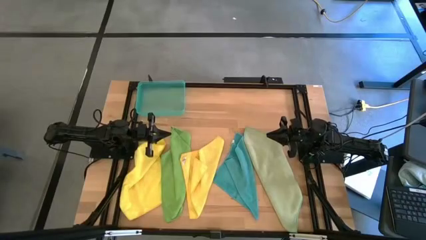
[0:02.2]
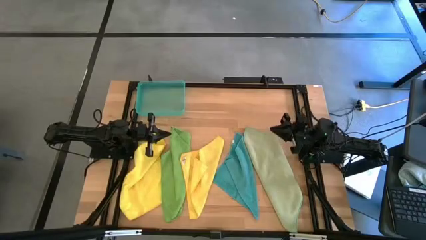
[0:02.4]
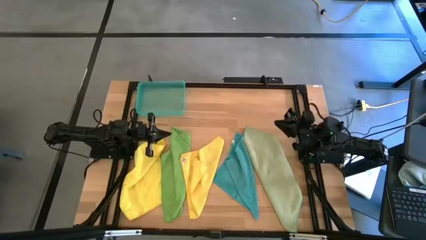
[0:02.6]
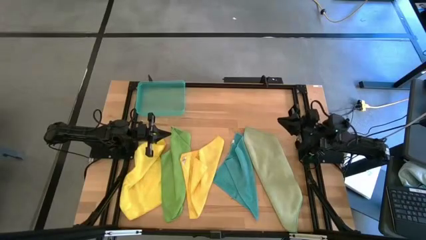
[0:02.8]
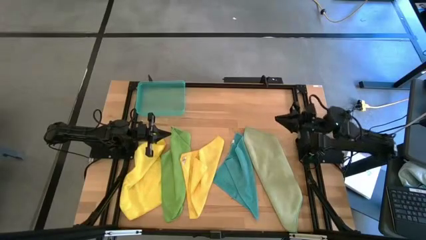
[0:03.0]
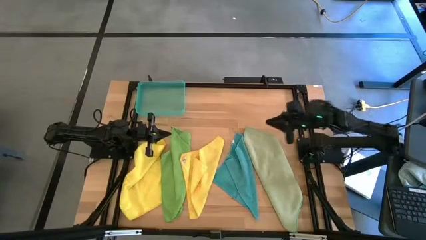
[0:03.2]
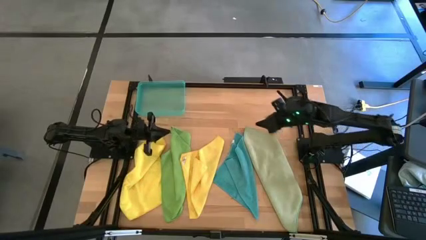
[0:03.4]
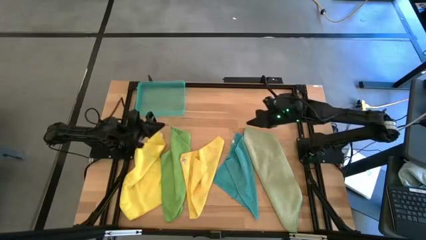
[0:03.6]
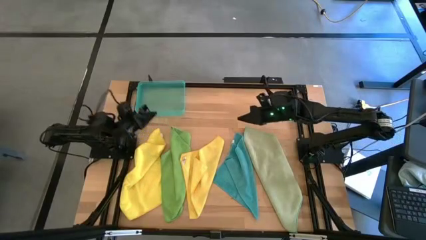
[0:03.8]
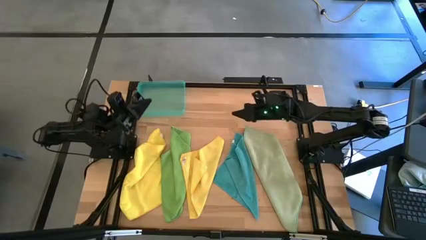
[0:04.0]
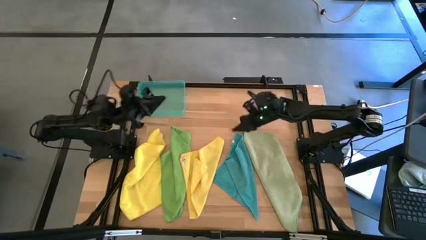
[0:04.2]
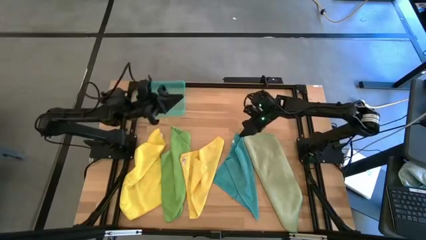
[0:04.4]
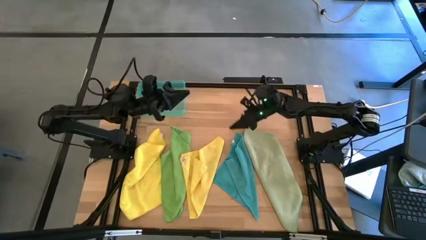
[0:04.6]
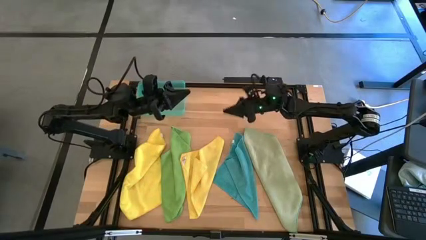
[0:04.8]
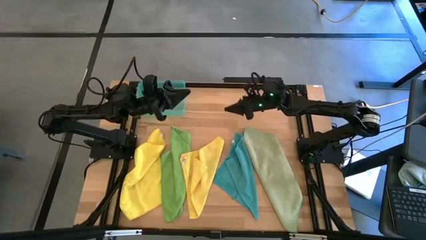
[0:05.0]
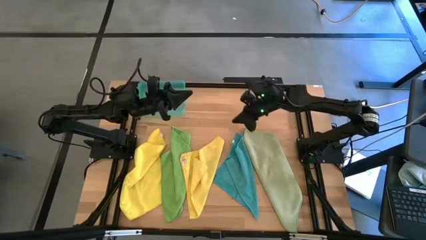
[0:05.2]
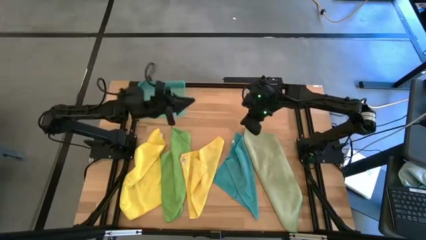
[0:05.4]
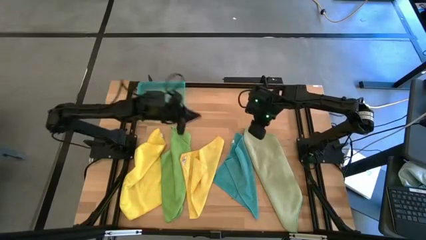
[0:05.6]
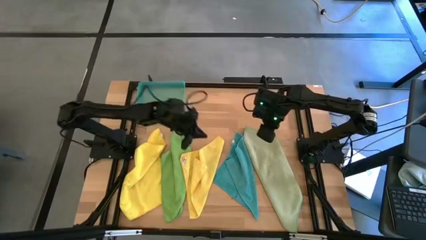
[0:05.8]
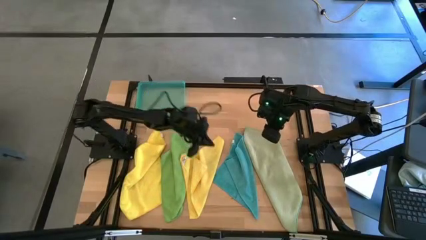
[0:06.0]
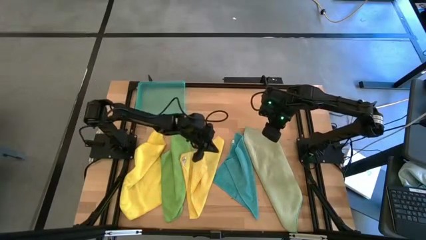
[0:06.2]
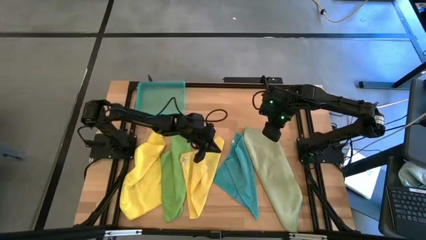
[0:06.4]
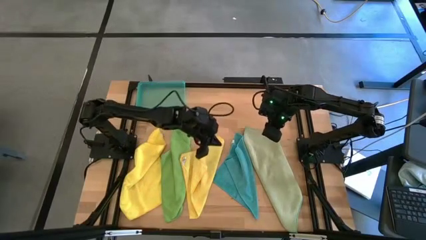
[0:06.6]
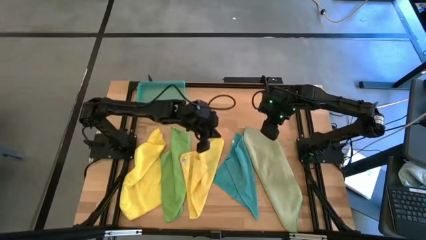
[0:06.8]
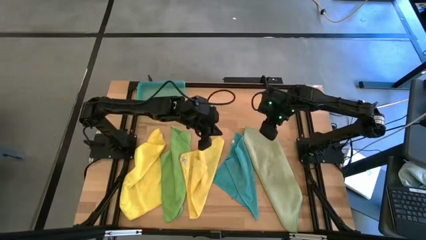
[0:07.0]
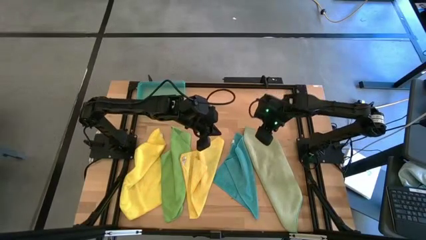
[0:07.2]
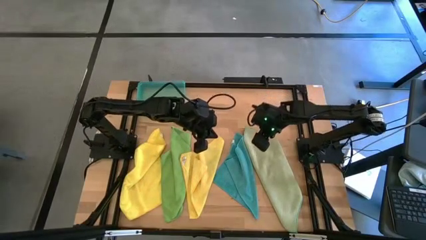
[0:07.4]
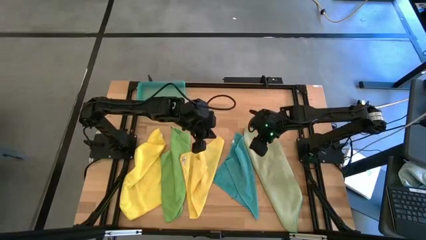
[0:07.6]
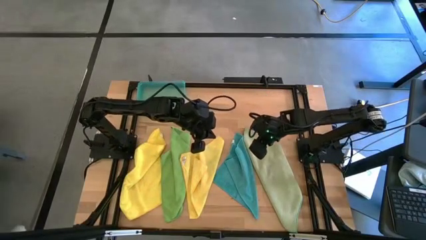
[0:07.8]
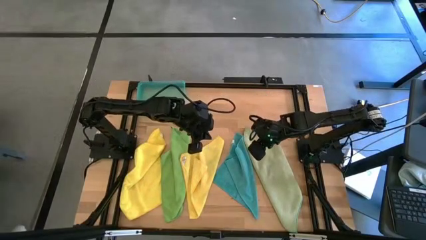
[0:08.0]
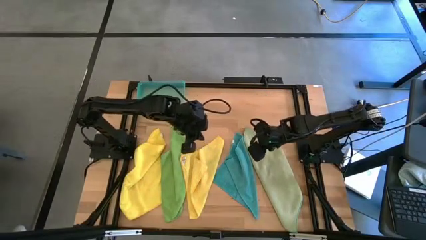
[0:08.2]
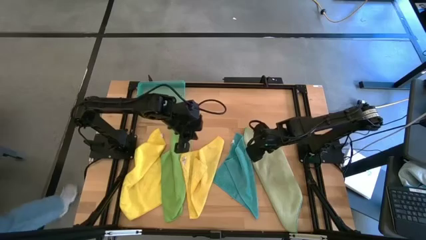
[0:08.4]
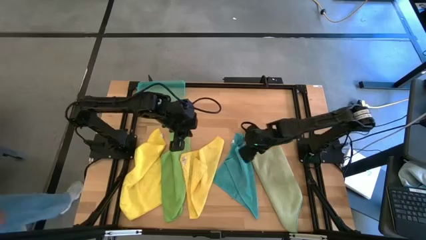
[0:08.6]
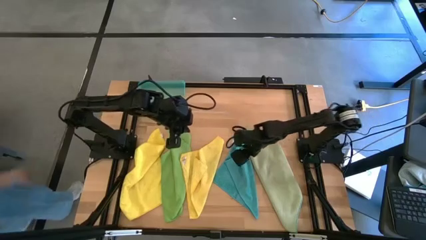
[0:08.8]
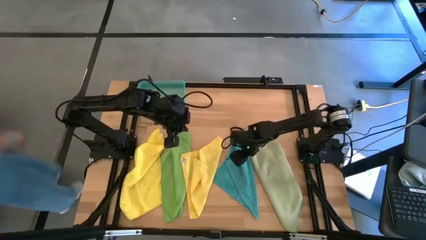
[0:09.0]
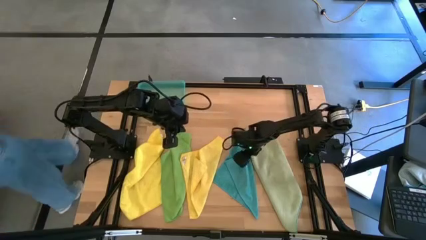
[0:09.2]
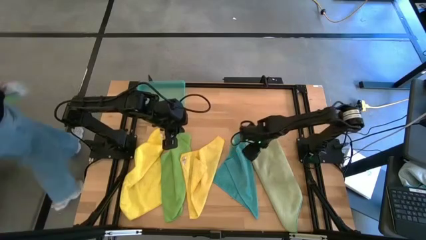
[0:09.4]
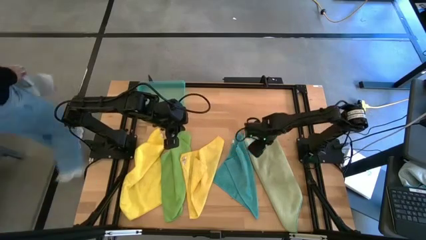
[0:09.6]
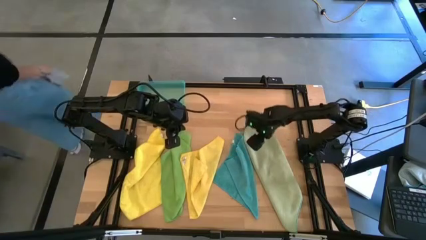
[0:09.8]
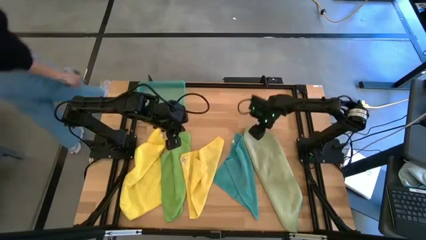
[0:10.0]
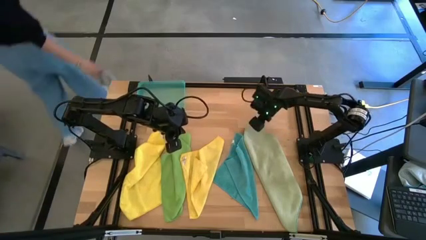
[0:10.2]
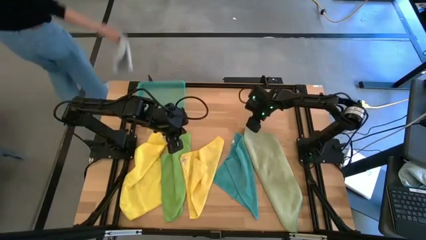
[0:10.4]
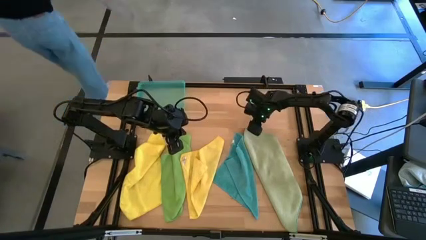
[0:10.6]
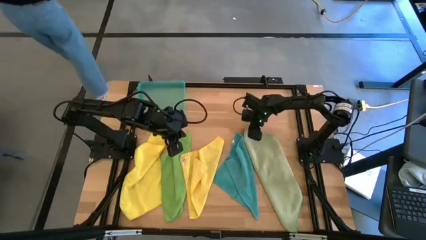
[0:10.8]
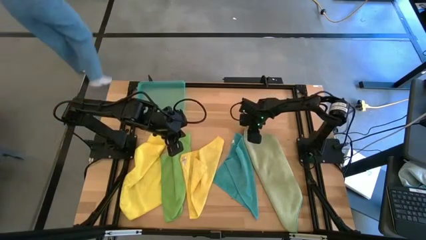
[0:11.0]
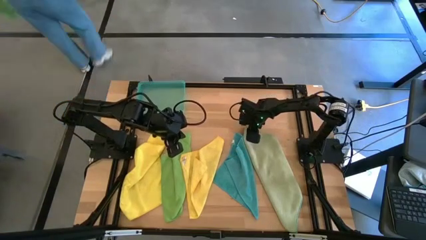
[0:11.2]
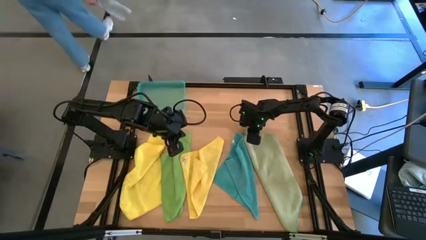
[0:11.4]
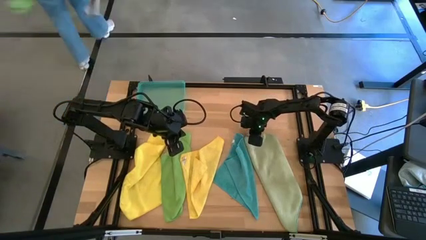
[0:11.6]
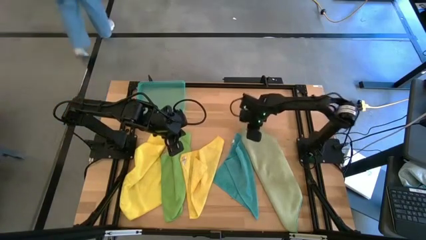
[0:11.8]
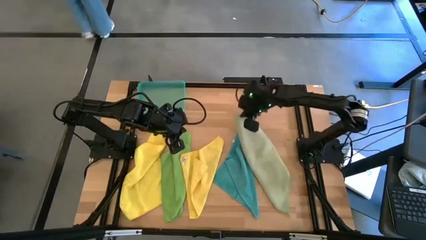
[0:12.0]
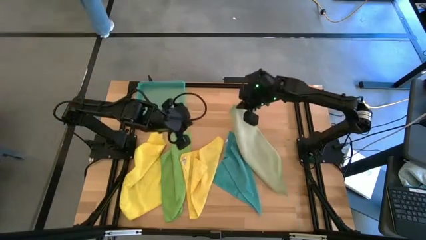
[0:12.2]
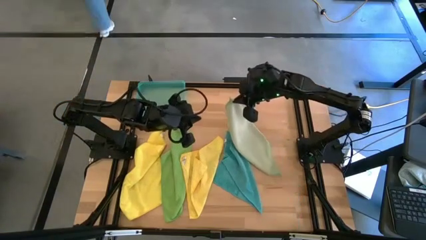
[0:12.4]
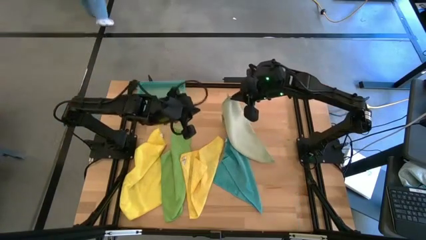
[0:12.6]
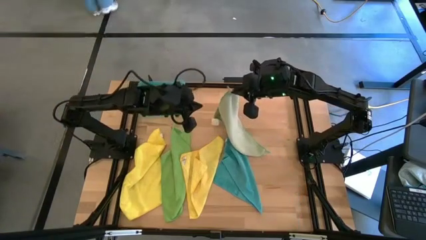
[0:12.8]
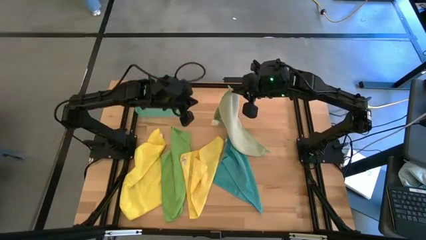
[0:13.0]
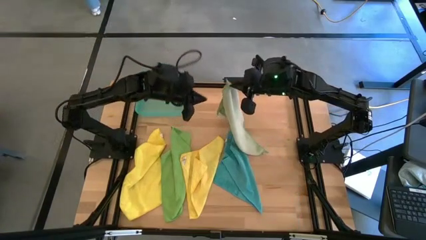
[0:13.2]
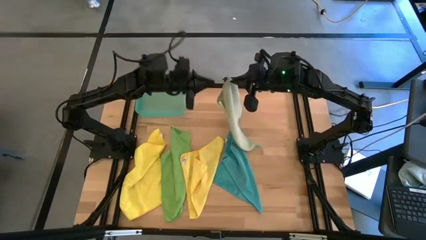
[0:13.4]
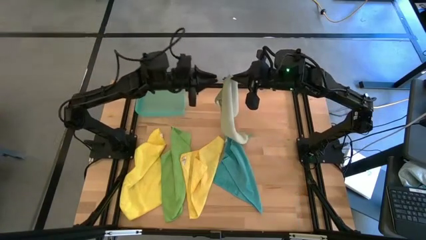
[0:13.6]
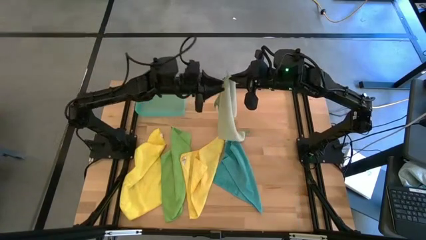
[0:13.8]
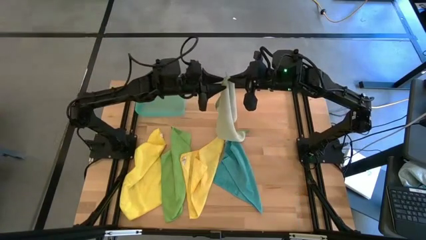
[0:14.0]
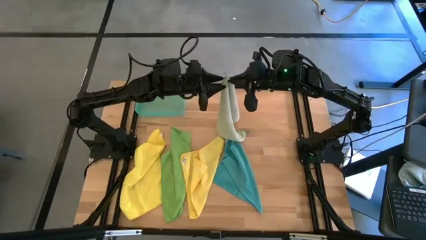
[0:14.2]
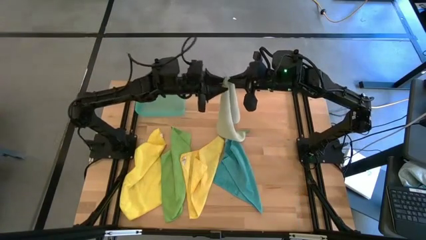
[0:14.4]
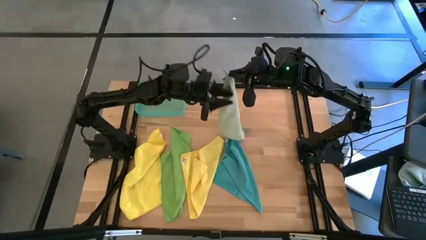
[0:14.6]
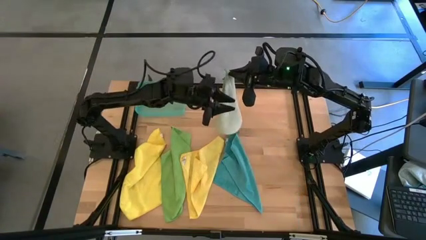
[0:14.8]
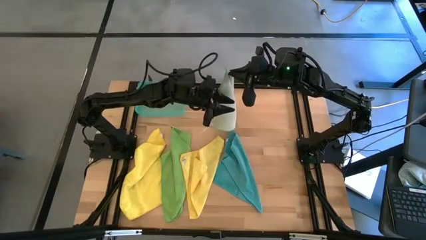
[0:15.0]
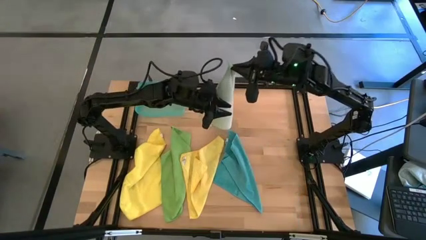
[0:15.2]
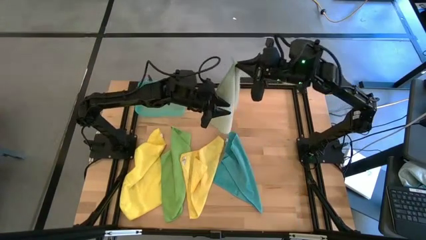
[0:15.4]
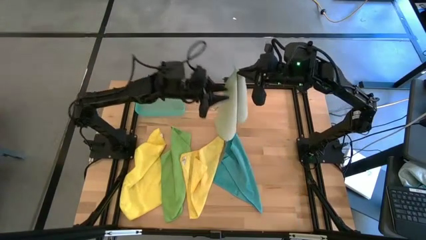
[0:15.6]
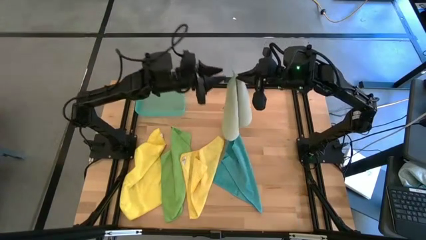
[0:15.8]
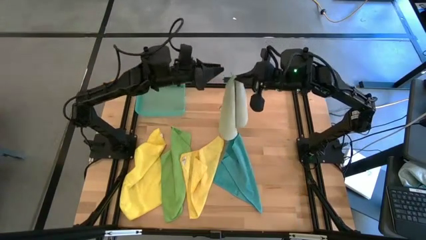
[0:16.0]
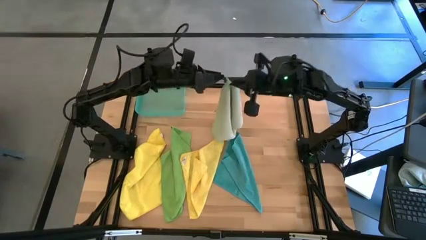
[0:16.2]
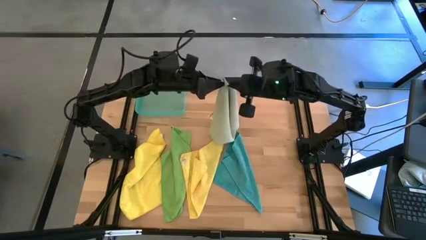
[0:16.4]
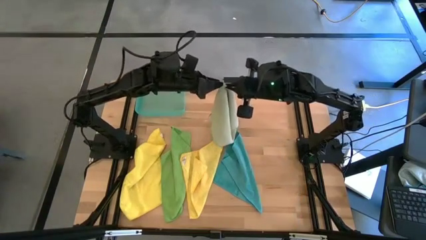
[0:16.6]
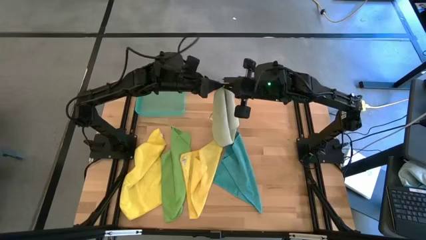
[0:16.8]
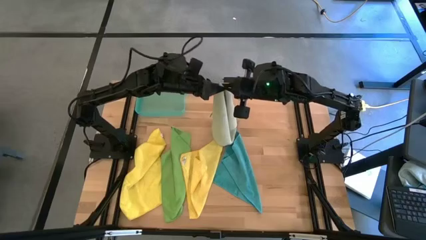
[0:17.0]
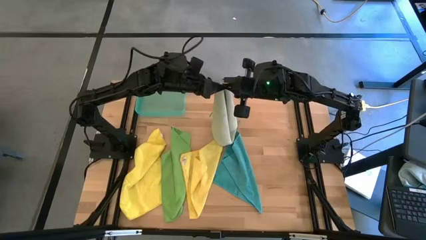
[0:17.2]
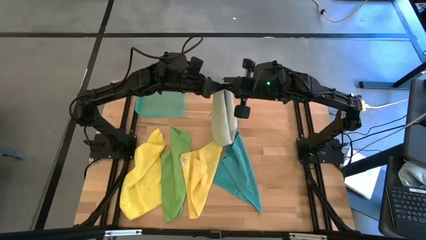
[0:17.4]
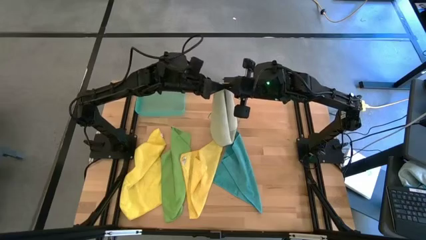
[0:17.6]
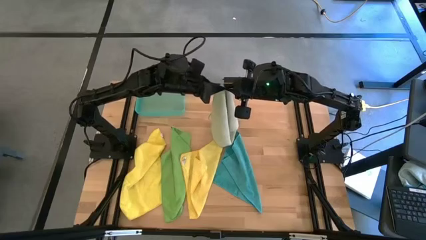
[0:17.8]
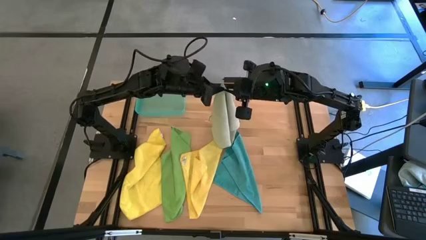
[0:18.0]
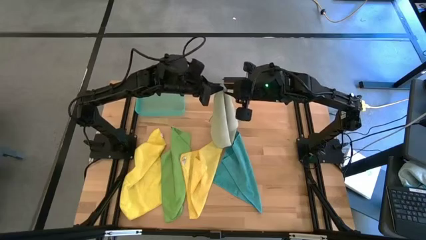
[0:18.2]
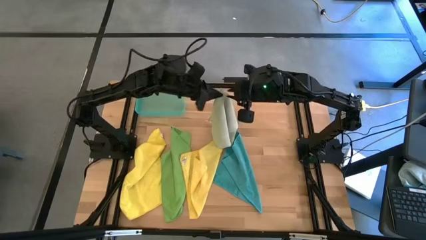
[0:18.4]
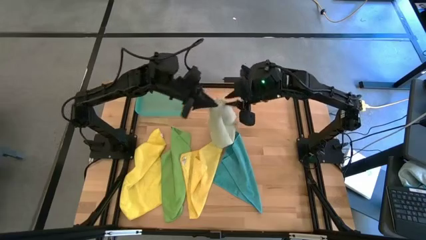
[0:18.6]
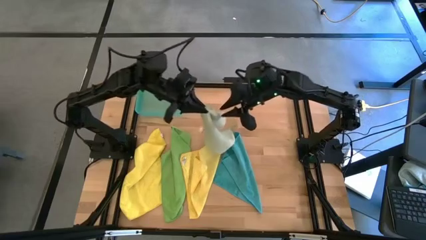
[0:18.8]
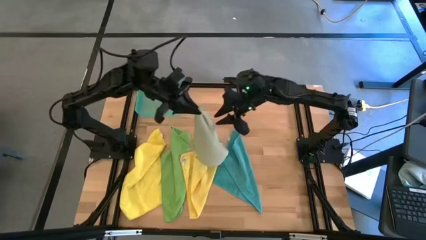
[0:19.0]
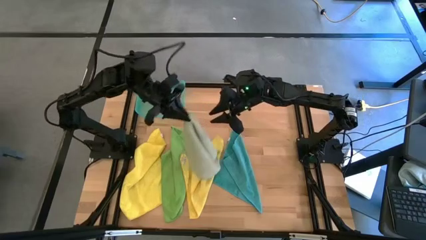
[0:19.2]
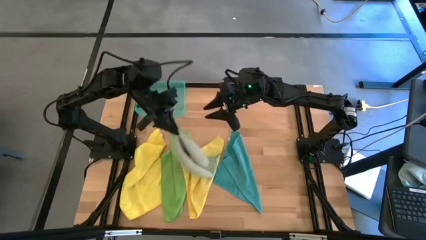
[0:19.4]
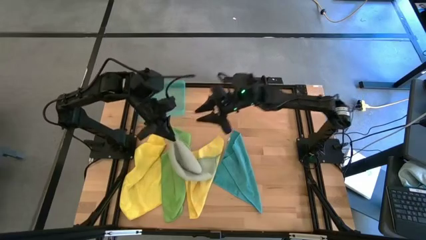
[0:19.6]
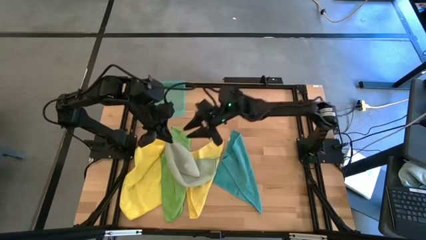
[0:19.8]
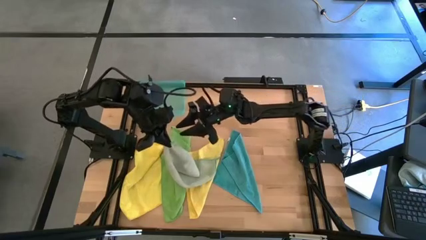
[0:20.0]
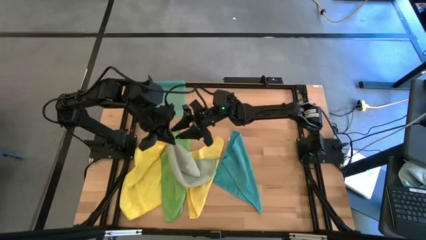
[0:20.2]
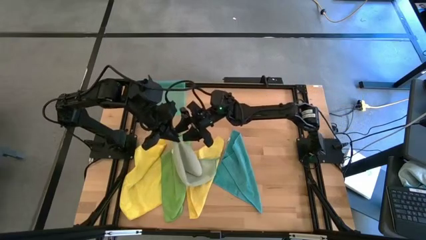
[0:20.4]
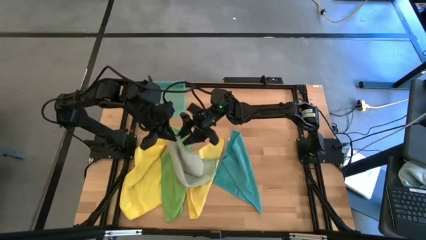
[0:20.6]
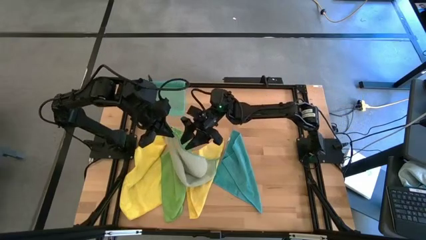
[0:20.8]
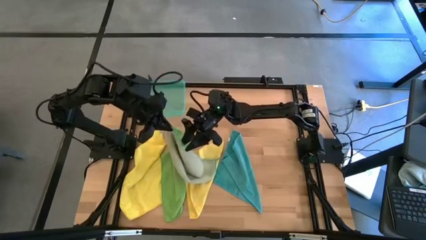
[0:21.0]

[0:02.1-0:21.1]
Task: Fold microfiber towels
Fold the light green microfiber cloth
